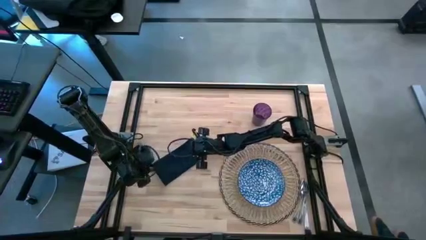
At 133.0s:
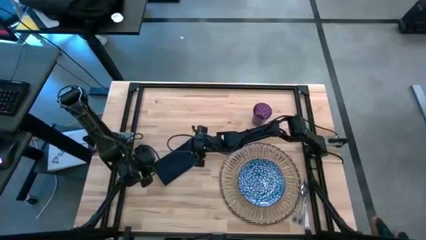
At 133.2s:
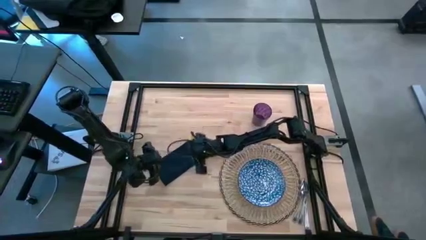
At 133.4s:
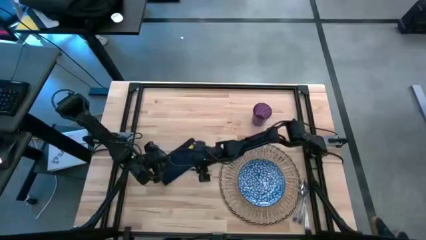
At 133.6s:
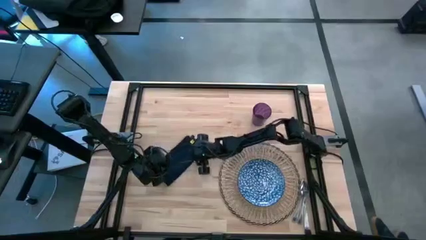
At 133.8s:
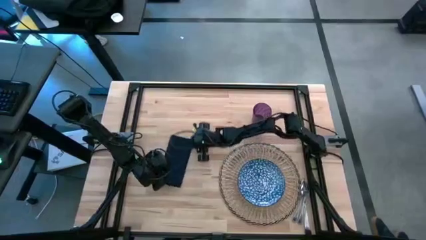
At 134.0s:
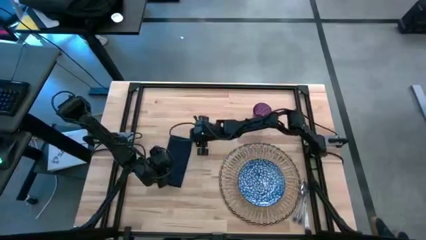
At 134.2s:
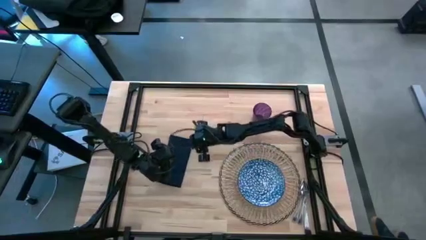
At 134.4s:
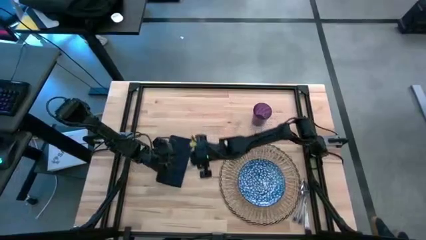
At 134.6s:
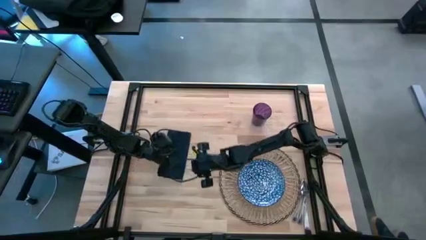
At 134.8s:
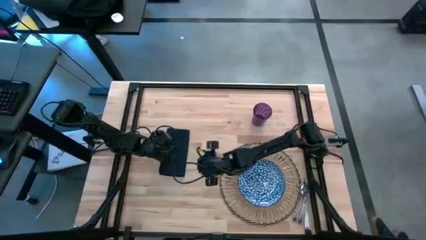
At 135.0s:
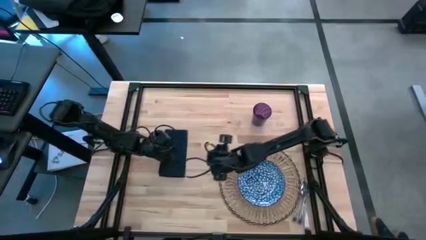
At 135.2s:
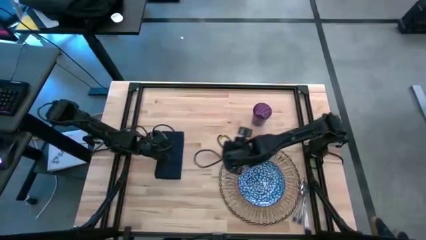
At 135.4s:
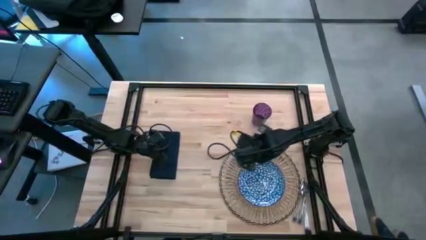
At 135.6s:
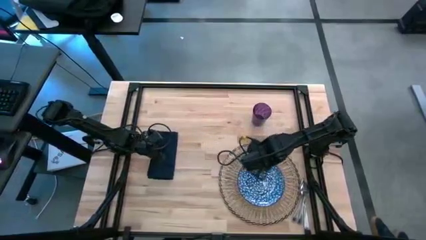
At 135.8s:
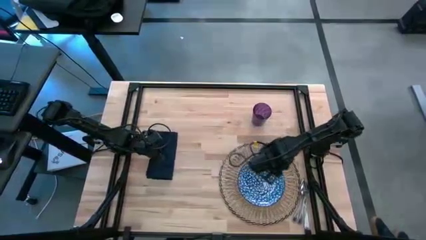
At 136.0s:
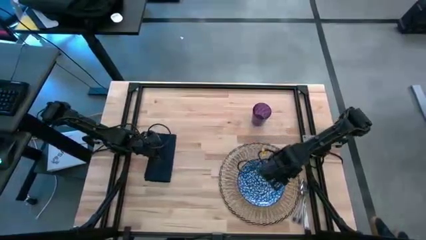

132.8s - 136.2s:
Task: Set table place
Move the blue table napkin to the left of the table

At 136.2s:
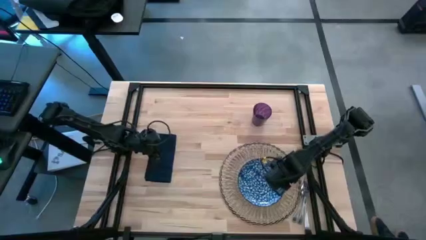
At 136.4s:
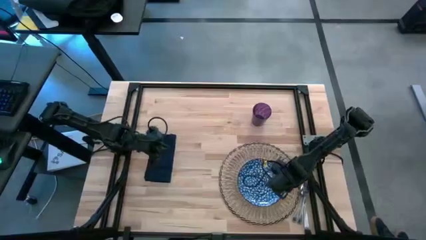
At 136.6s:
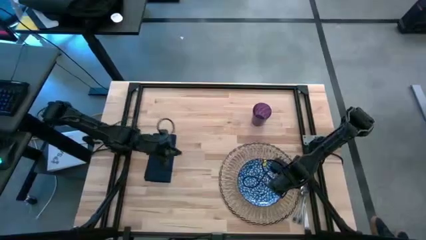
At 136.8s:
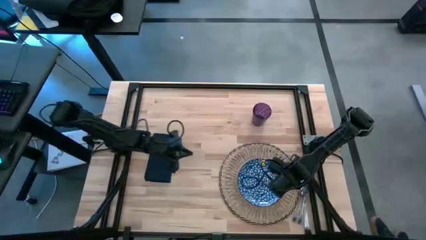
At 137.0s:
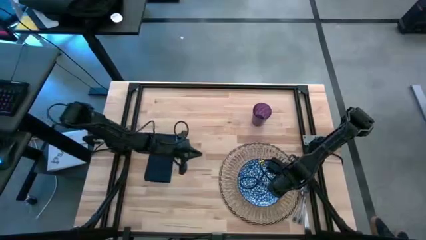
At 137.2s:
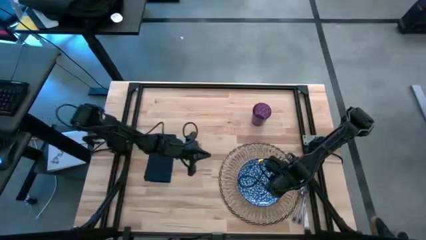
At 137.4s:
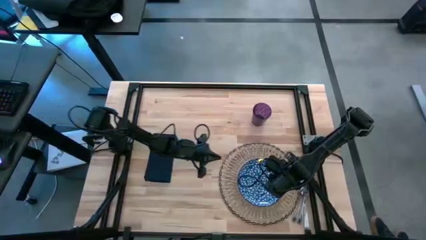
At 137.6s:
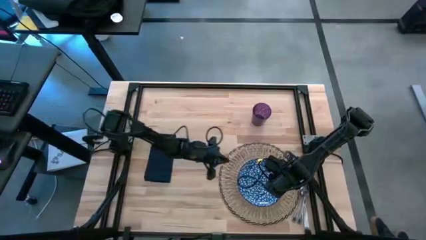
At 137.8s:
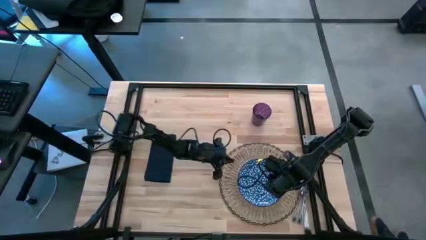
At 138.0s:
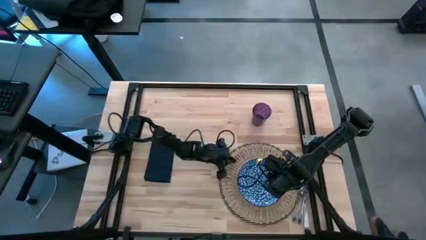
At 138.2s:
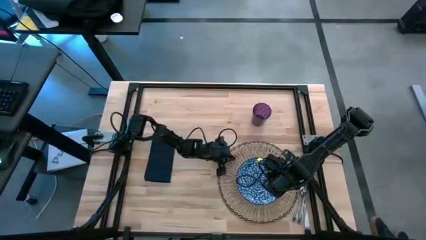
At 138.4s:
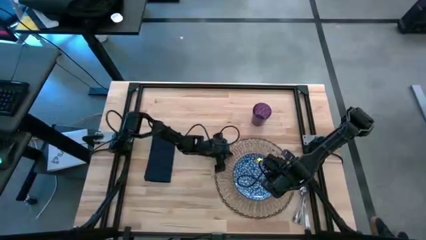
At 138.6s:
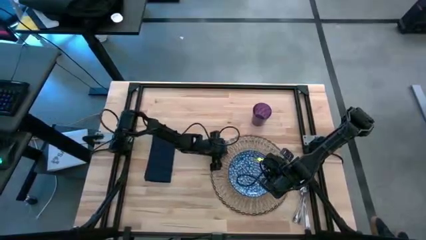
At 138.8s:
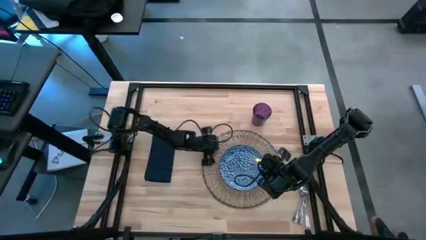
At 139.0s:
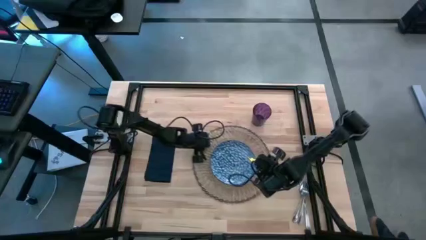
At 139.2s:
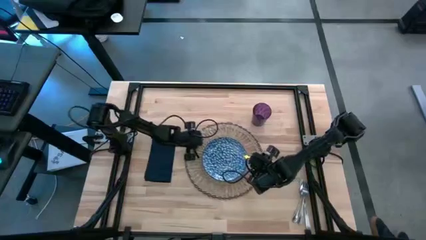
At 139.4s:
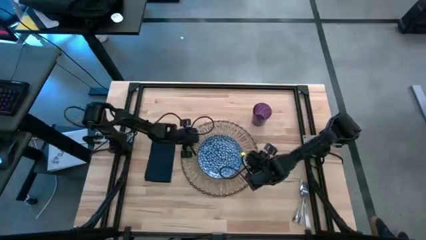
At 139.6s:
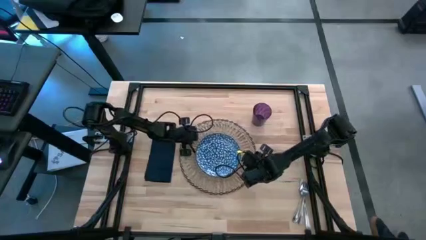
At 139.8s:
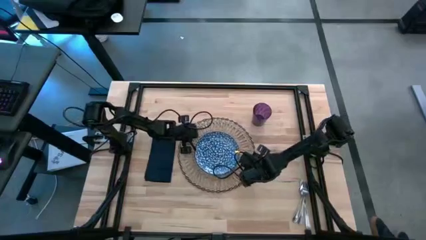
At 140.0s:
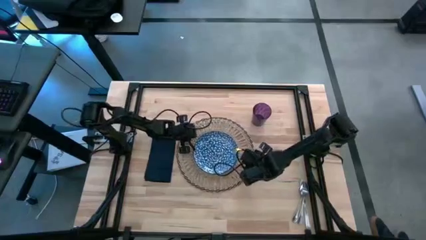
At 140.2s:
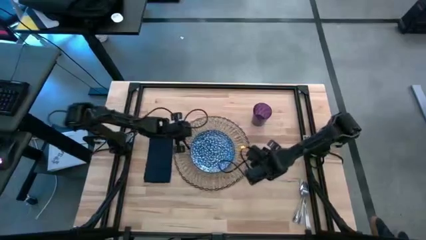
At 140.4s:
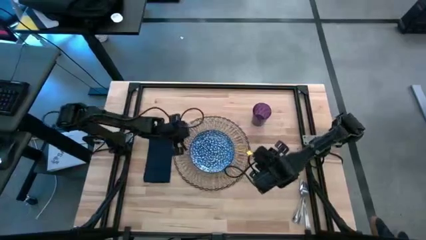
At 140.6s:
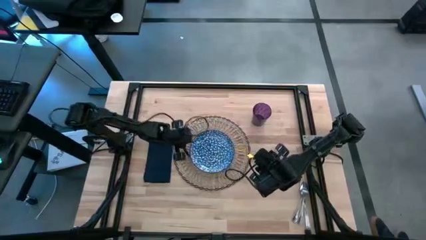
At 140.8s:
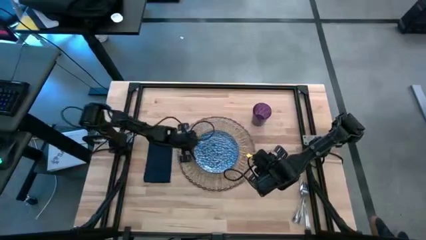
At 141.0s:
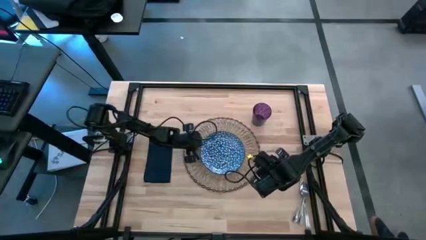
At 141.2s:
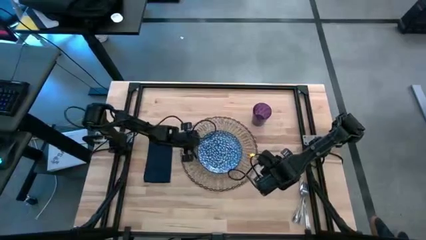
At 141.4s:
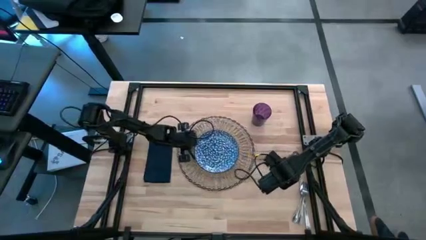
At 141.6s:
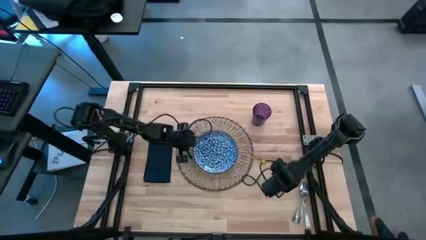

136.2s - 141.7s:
Move the table mat to the center of the table

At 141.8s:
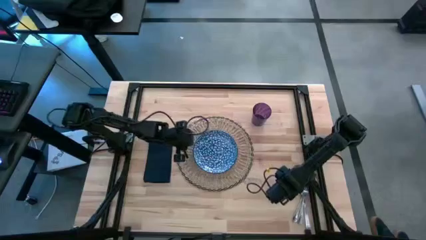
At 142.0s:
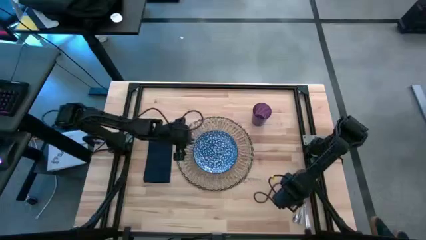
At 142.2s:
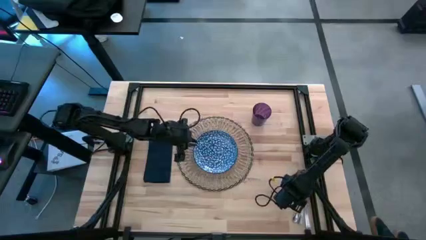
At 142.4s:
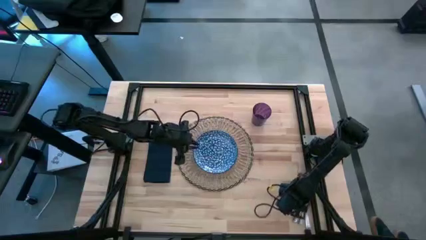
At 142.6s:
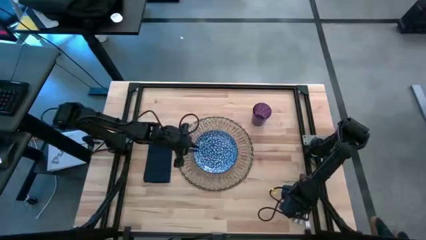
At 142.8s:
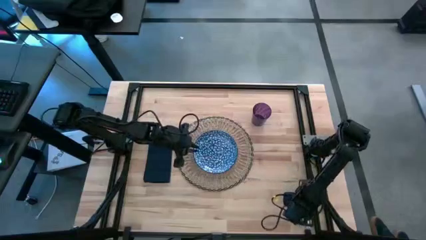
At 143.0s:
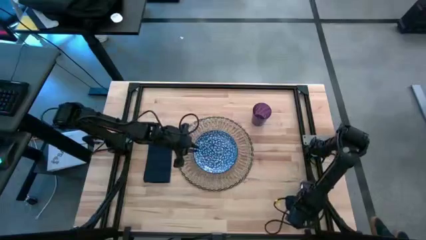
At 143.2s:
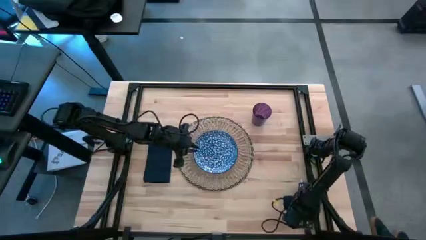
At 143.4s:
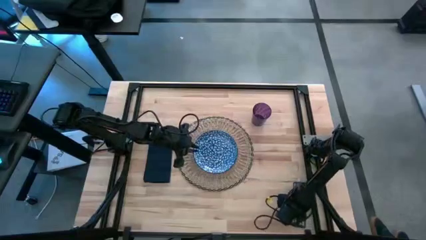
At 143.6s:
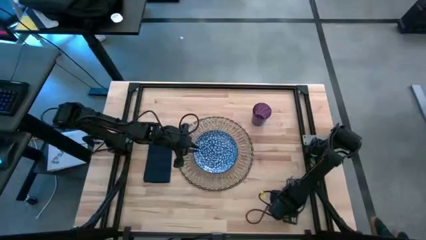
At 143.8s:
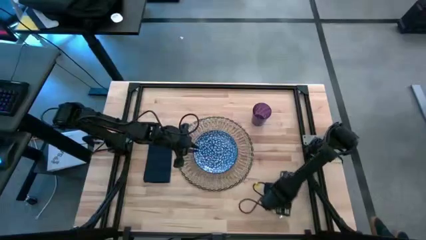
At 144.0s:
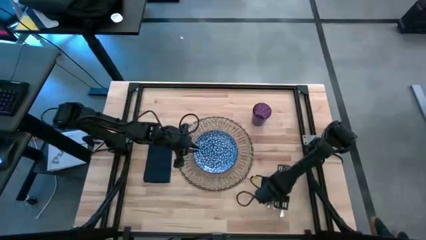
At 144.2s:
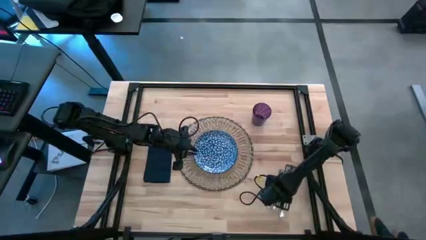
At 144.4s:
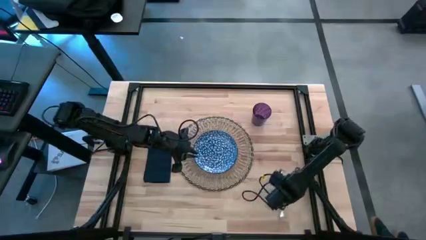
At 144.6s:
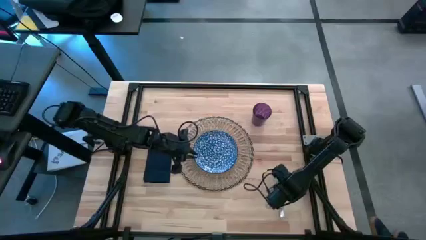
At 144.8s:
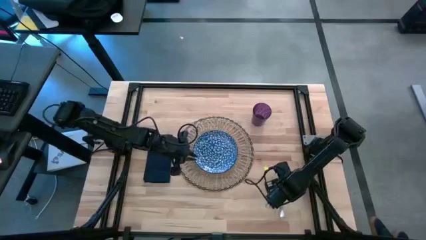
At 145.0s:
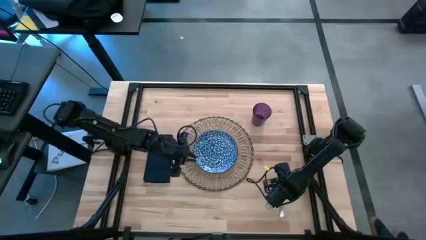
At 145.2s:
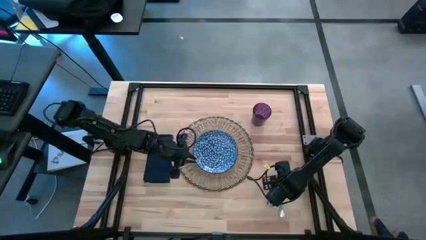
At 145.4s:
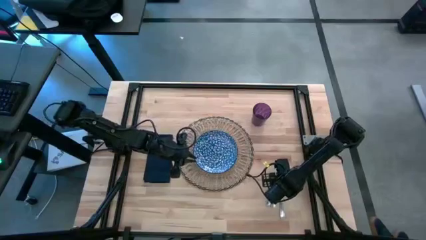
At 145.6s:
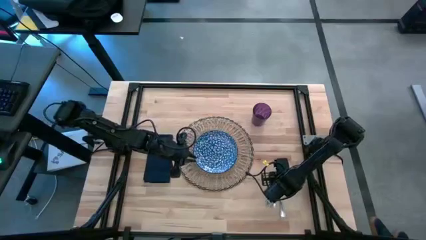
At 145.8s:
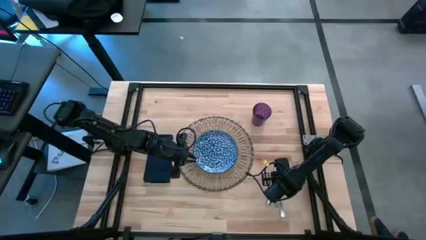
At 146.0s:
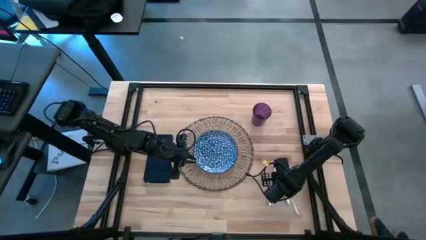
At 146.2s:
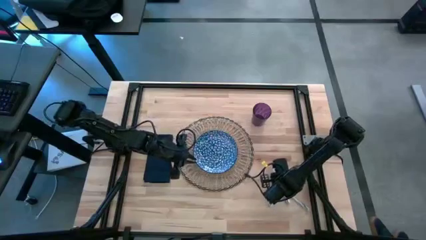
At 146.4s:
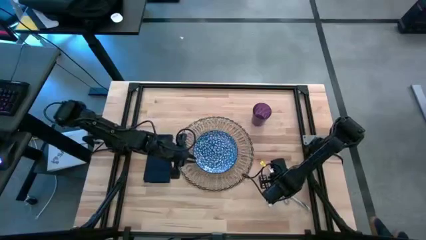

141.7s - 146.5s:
Put the silver fork on top of the blue table napkin

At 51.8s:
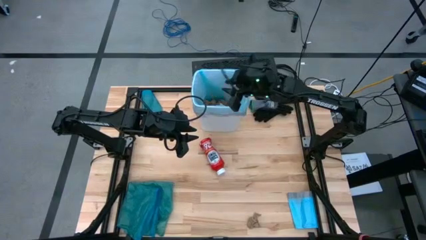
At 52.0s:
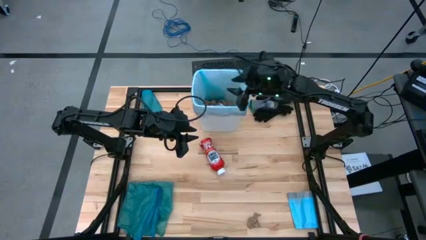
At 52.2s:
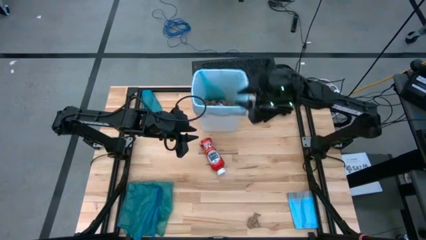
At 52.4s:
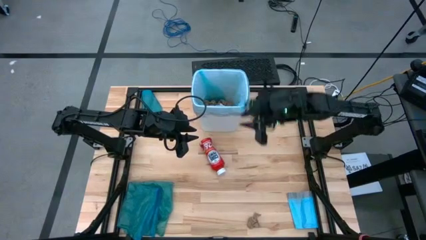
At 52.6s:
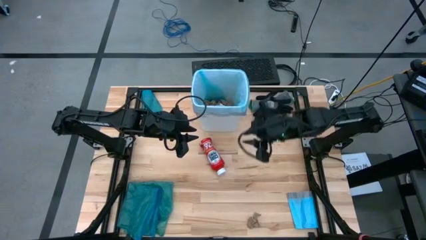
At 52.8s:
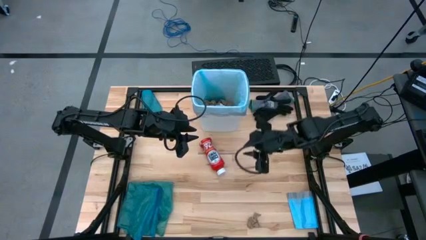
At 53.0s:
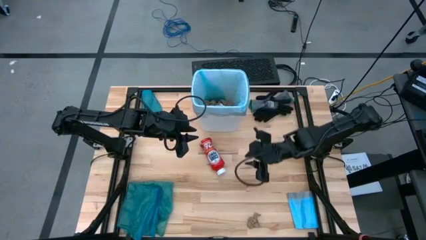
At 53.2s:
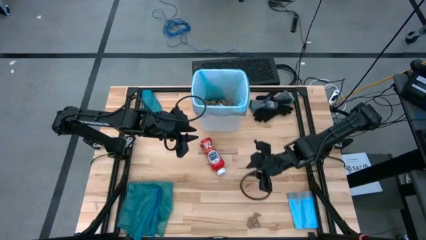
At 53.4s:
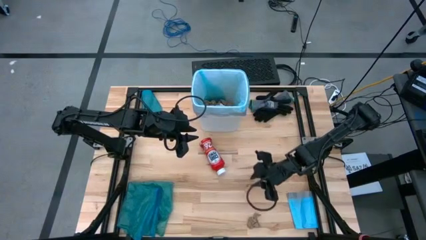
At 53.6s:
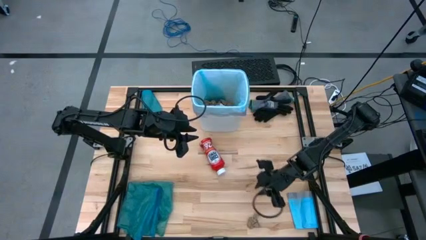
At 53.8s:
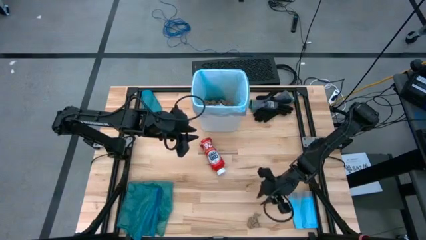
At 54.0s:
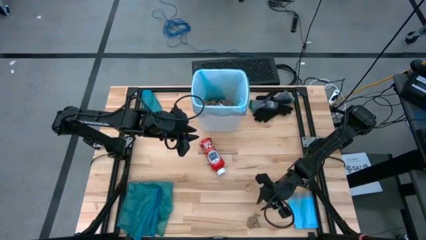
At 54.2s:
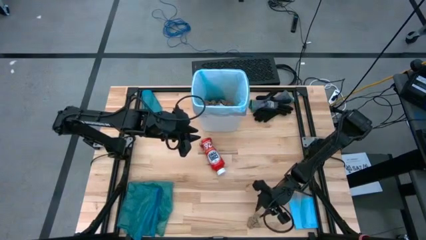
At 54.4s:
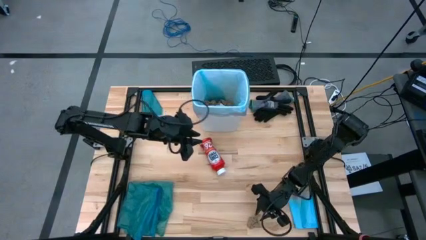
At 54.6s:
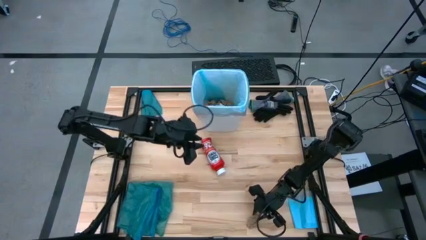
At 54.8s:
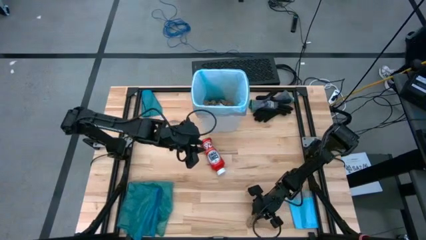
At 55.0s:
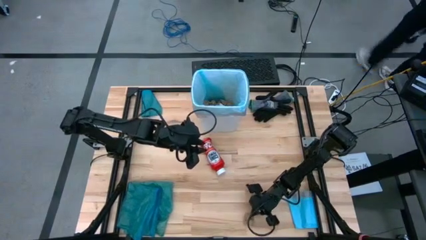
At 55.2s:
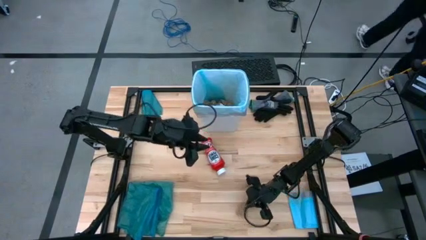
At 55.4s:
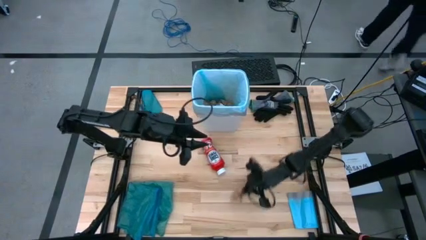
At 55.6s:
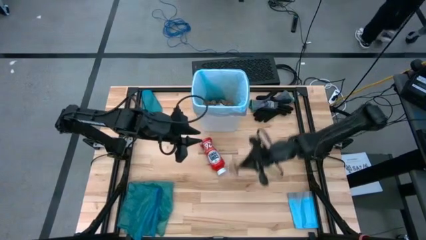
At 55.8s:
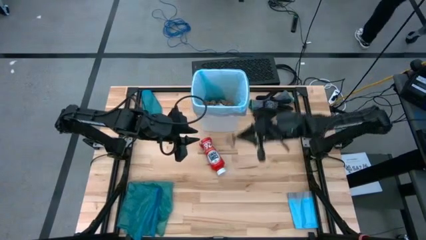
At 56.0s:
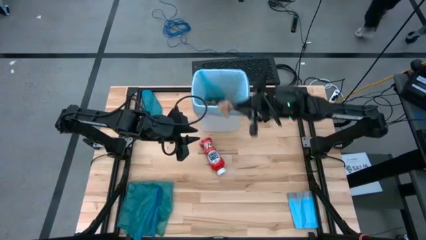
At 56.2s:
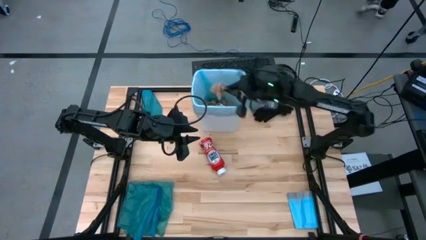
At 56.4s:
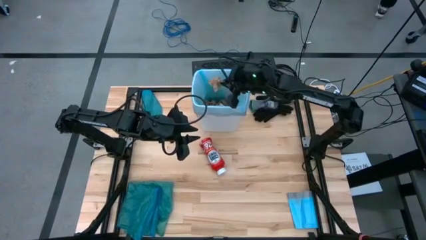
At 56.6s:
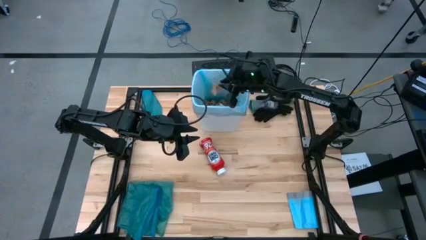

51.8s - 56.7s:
Task: place trash/remove bag and relplace
Put the brown paper into the white trash bin
